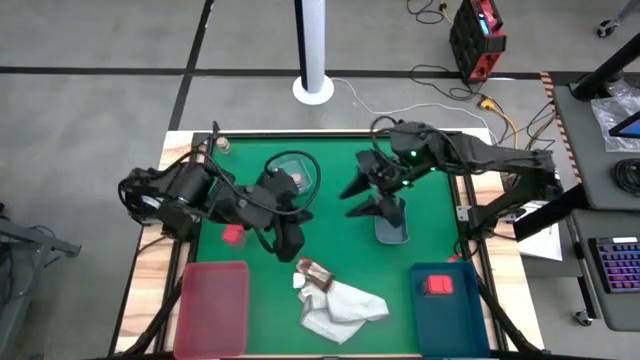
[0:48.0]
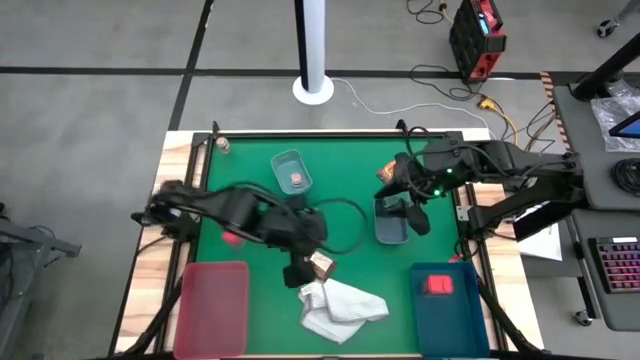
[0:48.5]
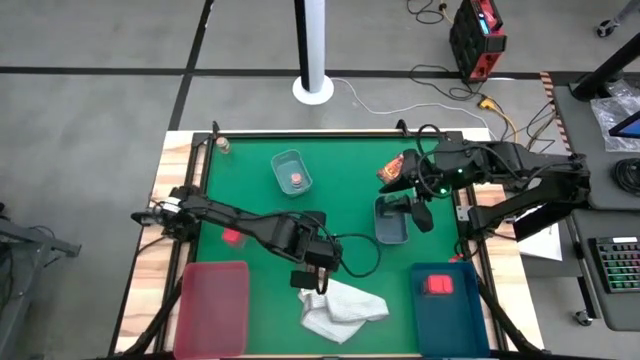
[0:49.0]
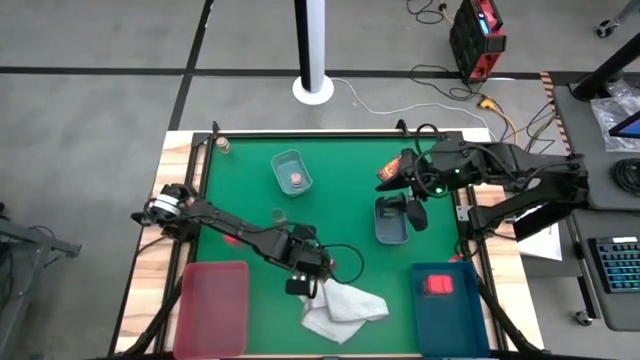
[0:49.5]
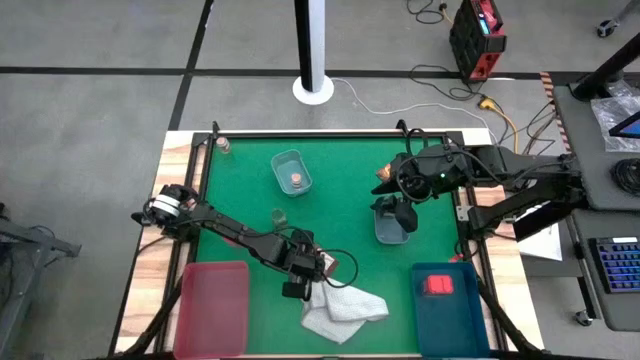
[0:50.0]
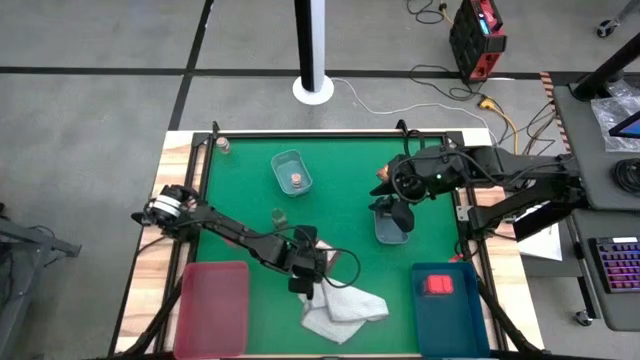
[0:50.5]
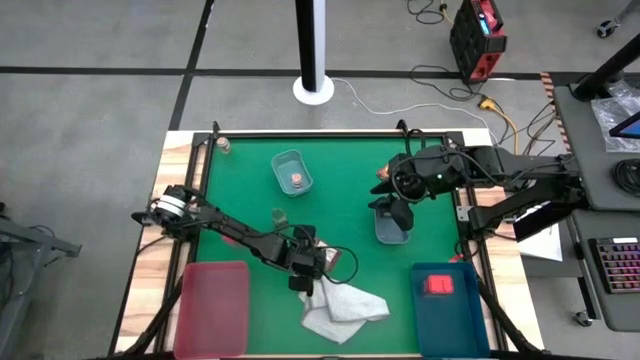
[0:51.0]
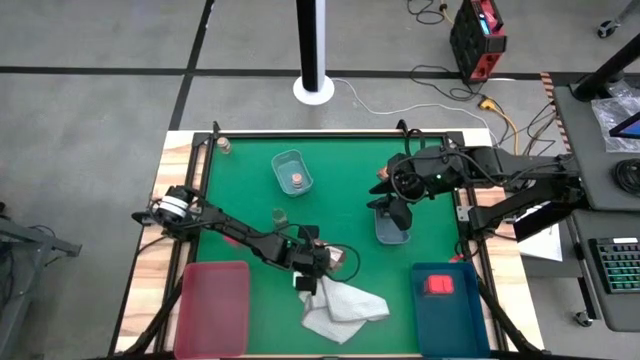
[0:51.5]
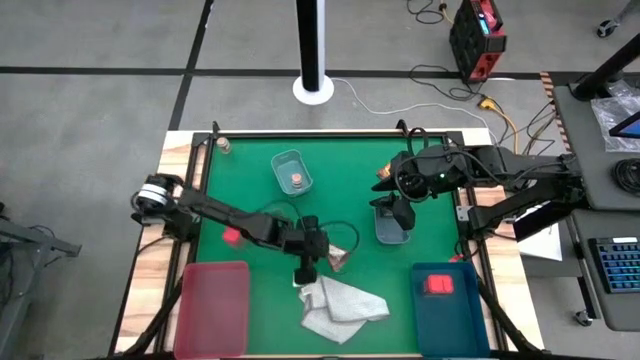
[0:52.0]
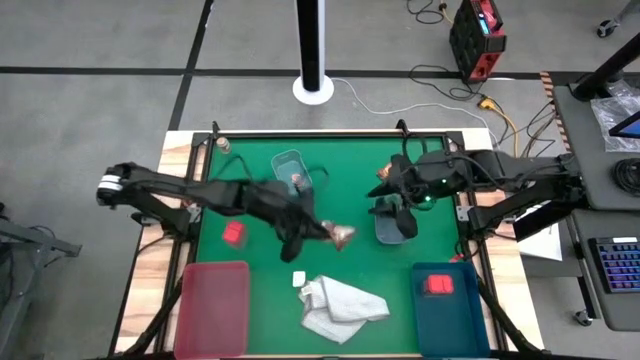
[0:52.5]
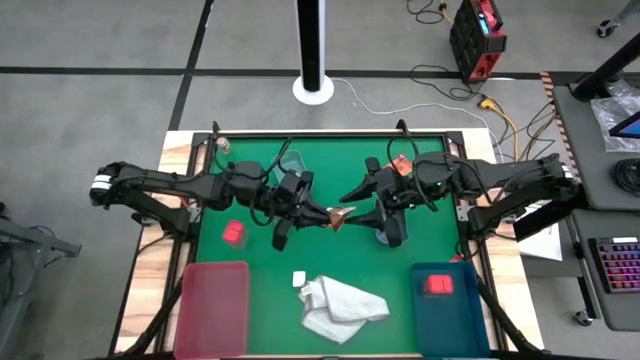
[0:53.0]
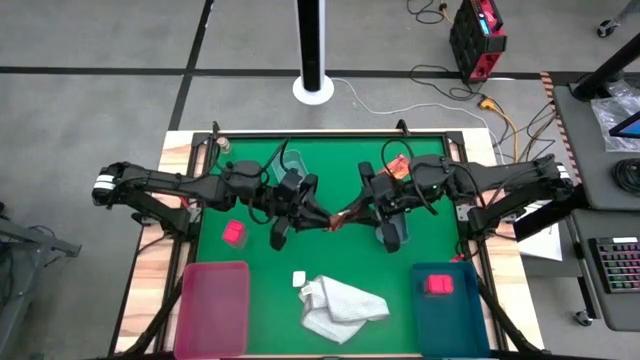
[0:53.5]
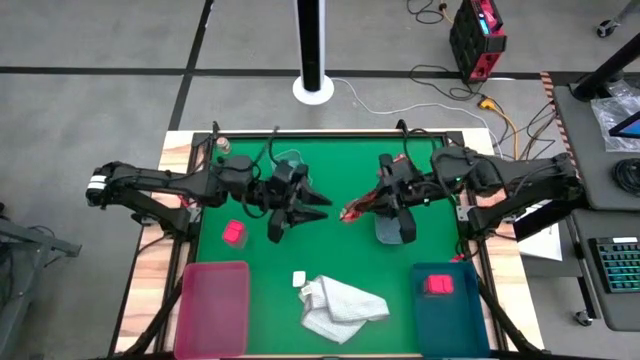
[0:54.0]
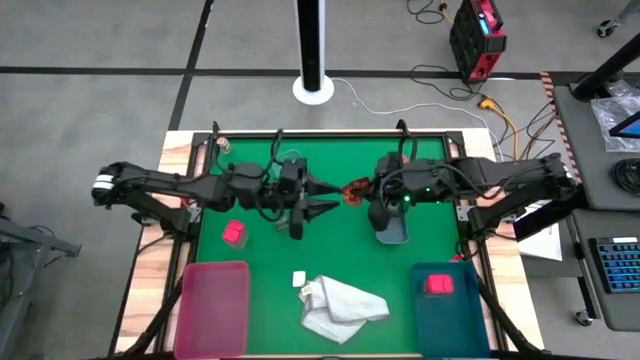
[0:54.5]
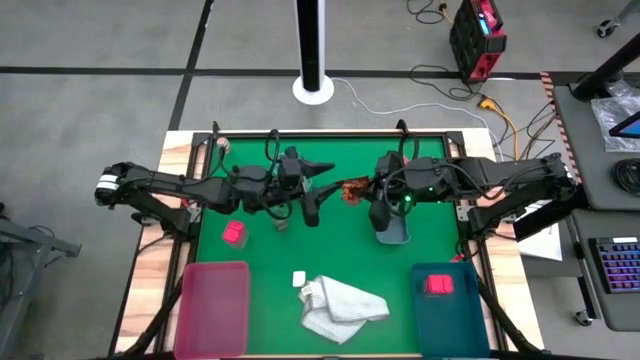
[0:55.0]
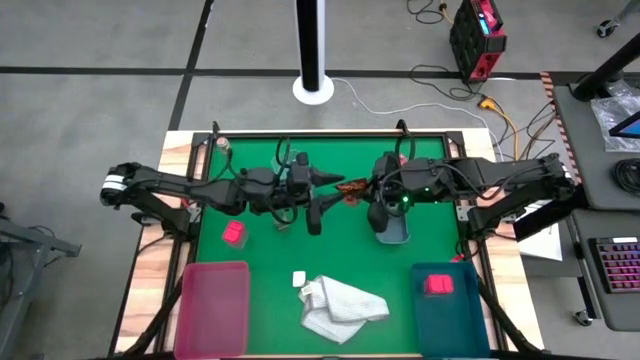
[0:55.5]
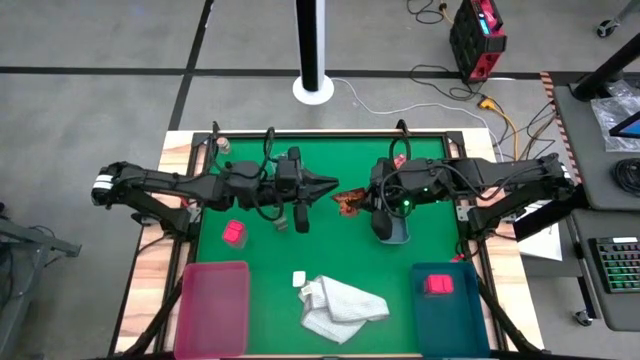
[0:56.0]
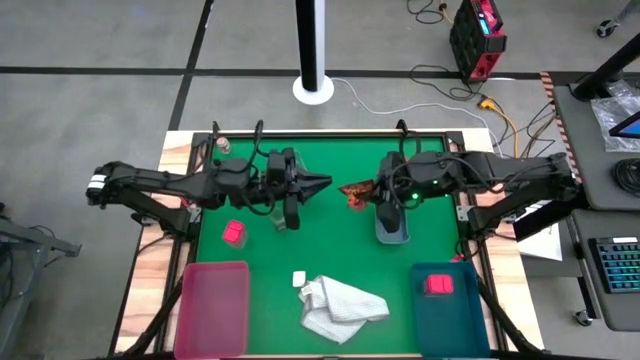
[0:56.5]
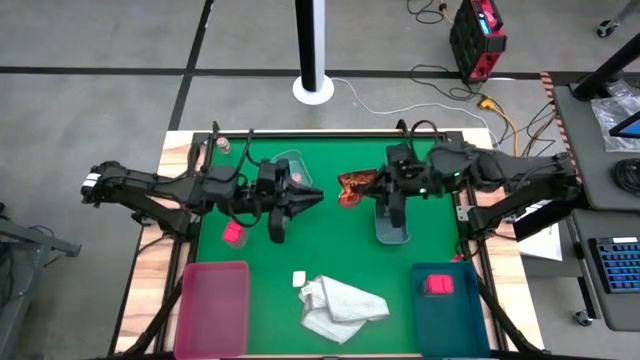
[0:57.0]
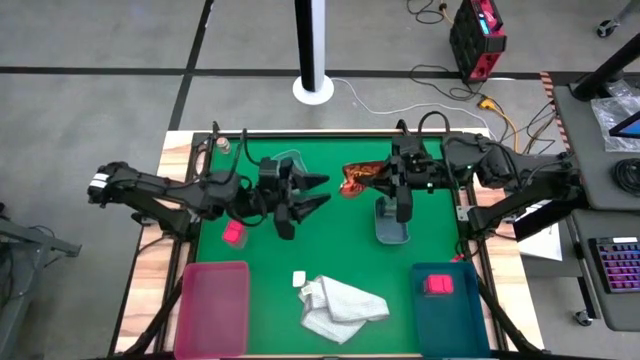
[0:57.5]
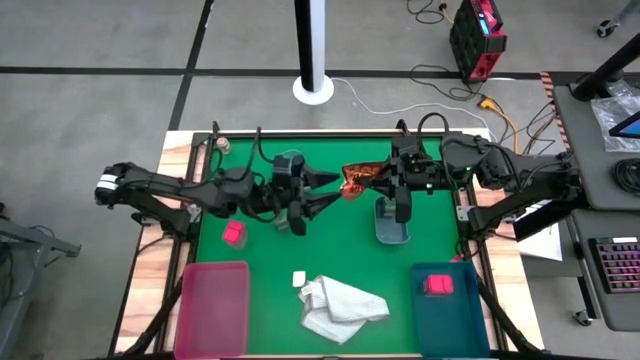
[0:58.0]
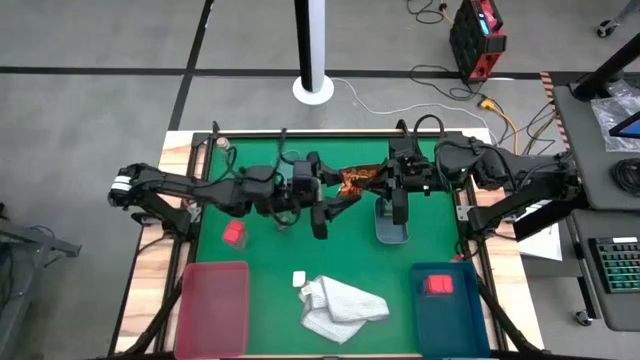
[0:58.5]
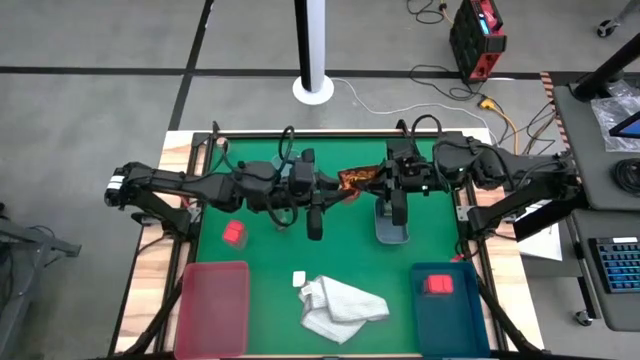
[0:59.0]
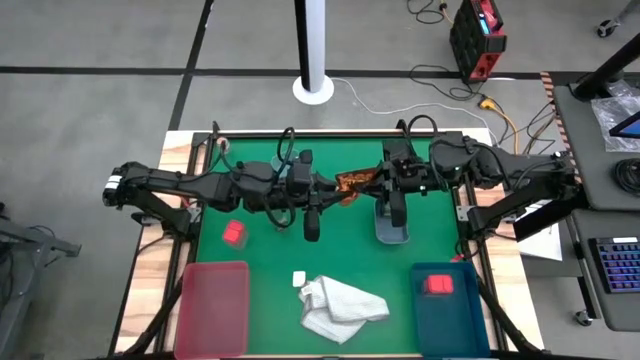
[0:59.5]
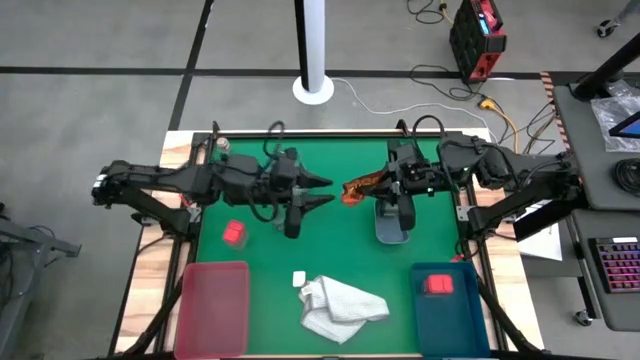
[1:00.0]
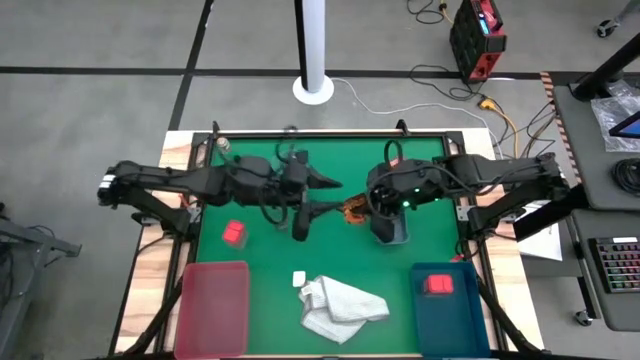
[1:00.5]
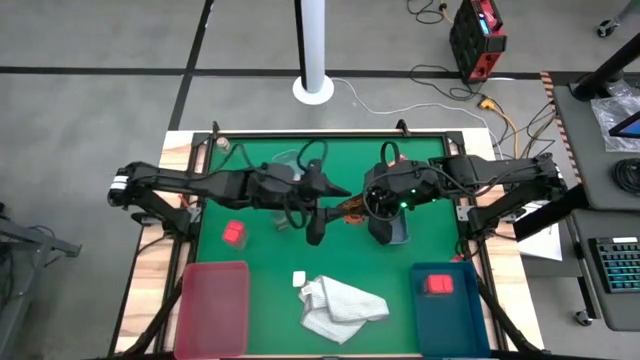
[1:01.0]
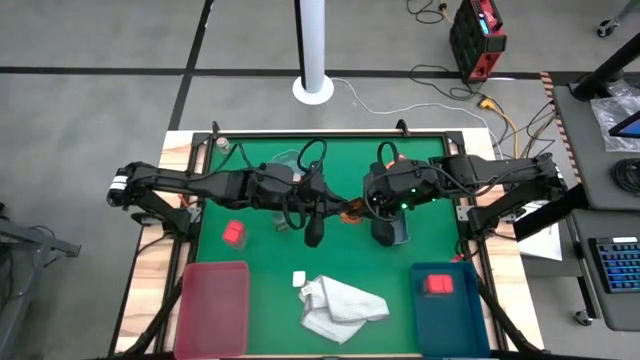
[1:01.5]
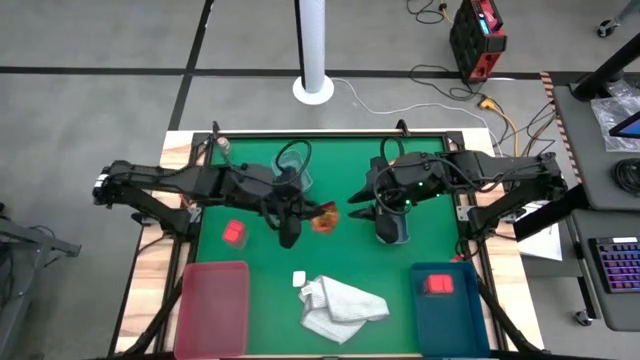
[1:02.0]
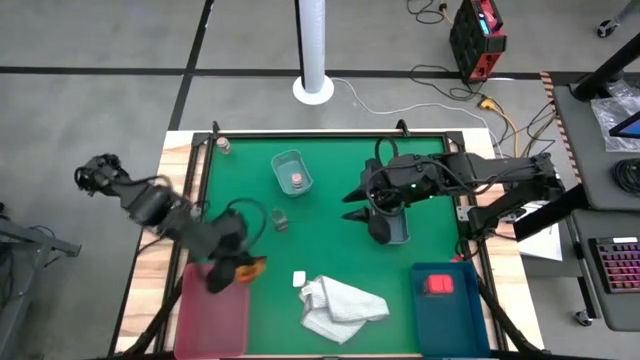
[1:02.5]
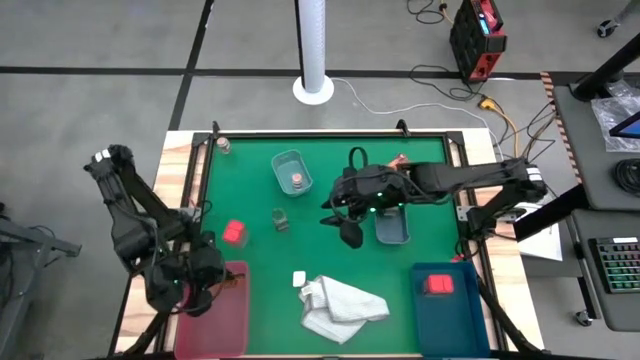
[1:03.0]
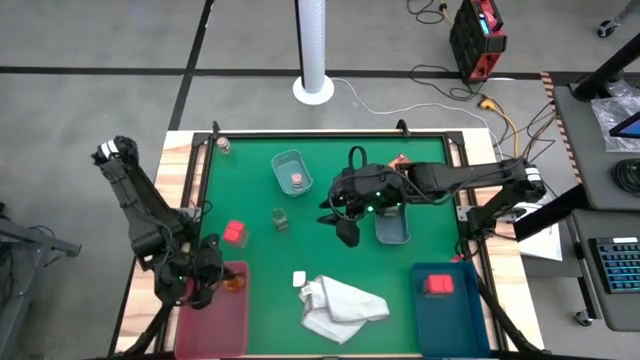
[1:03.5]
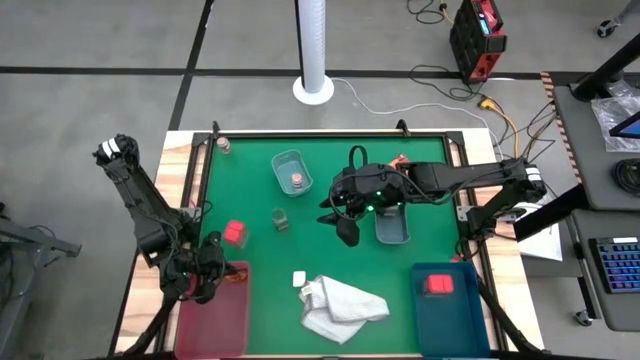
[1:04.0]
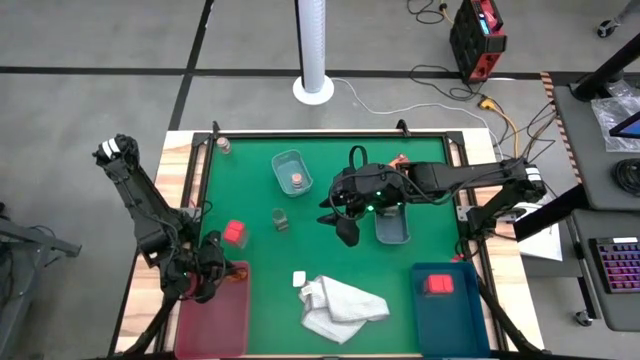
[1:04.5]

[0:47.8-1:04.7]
Task: Sort spices by type
Put the bottom orange spice pack into the pink bin

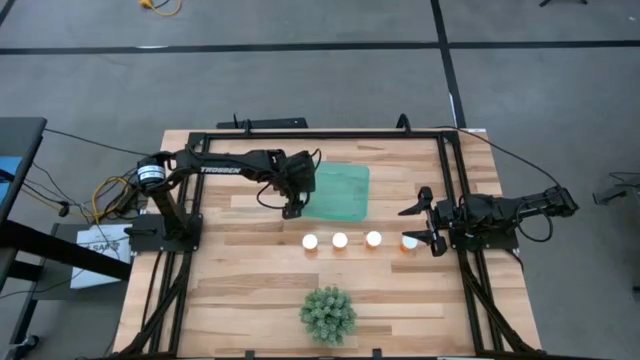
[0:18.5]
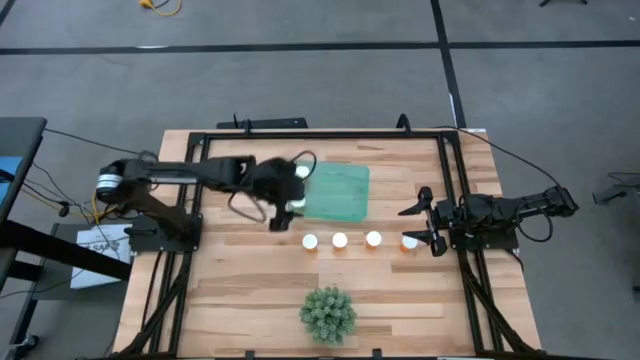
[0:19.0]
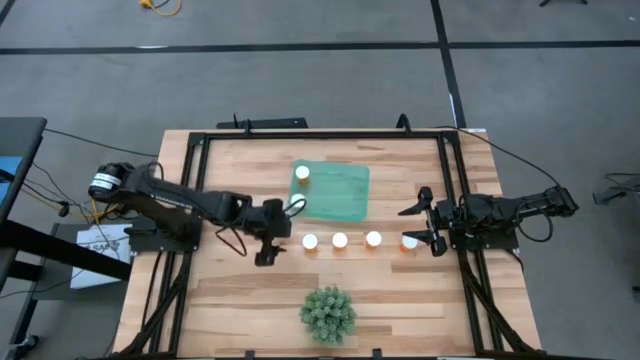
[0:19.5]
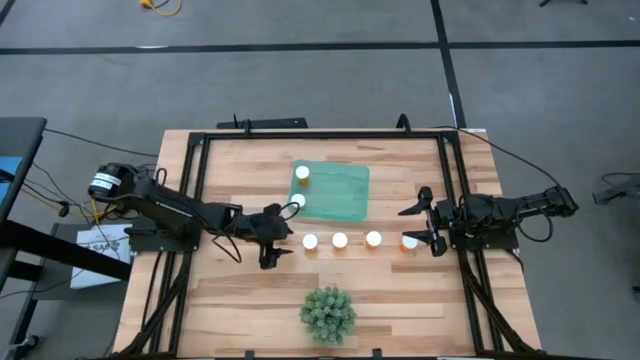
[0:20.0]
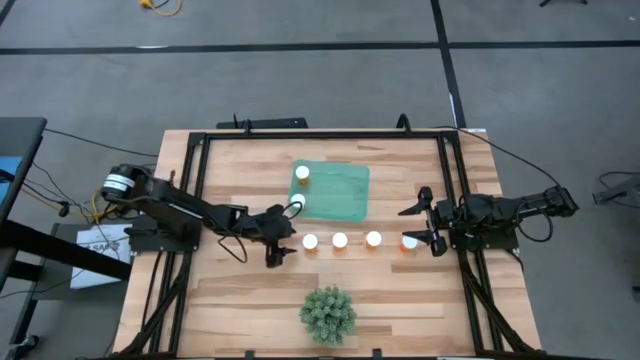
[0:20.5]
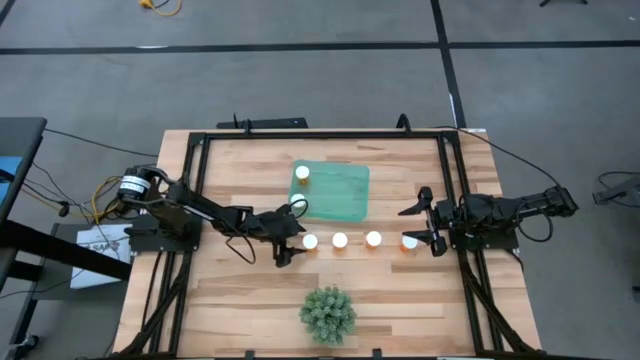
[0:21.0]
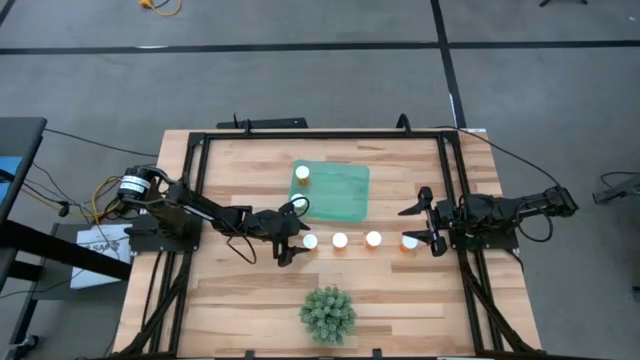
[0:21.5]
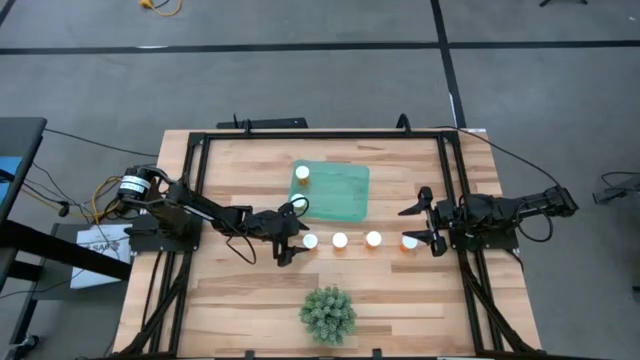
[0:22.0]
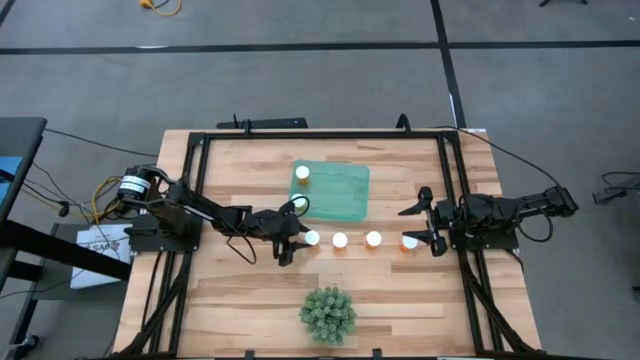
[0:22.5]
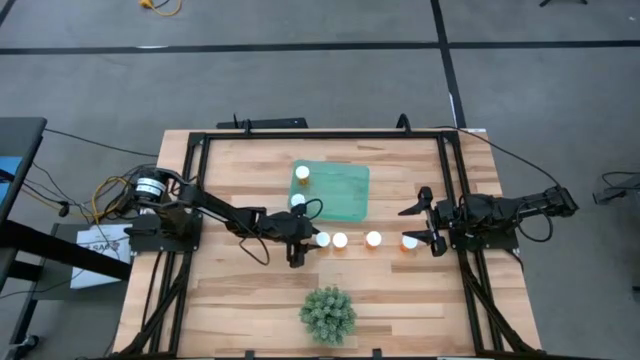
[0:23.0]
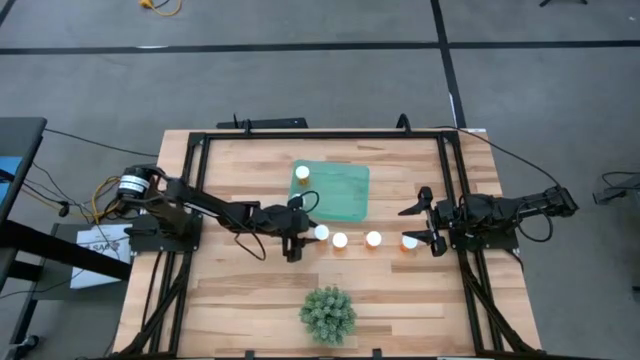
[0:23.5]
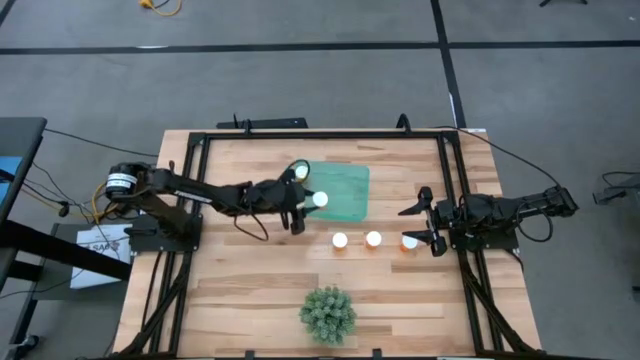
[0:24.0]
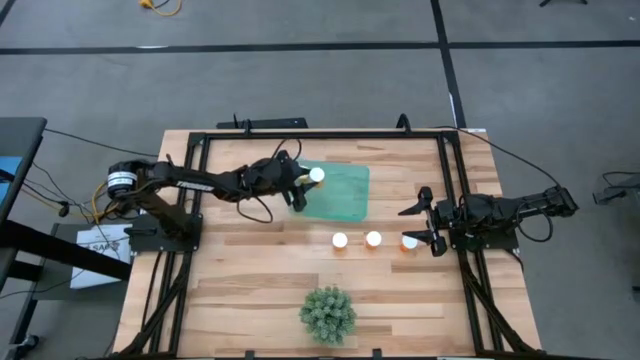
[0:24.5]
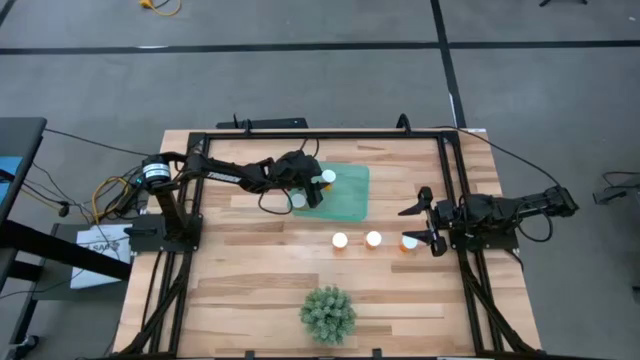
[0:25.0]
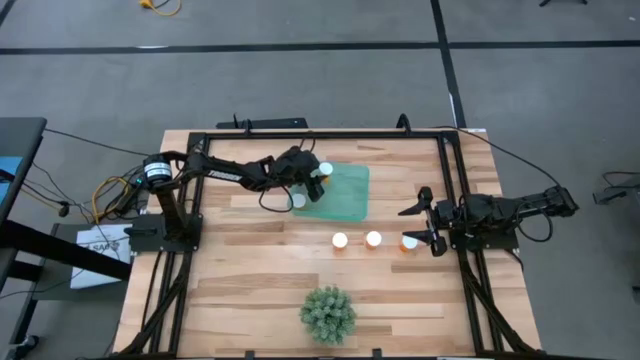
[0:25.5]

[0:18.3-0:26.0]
Task: Pick and place pill bottles into a basket
Put the orange pill bottle into the green bin
